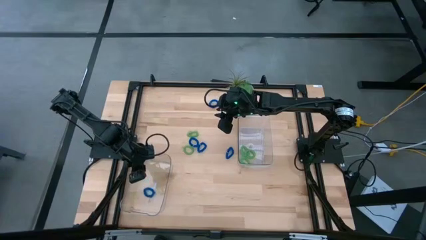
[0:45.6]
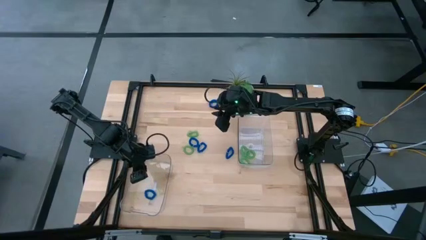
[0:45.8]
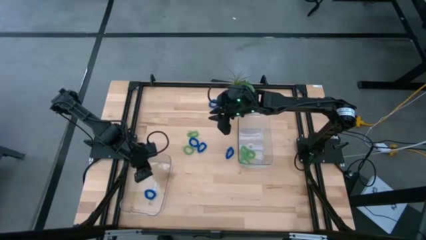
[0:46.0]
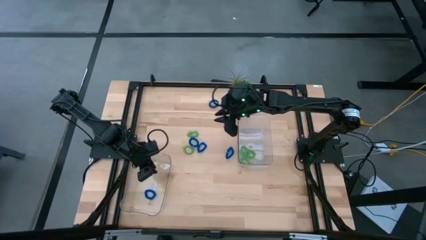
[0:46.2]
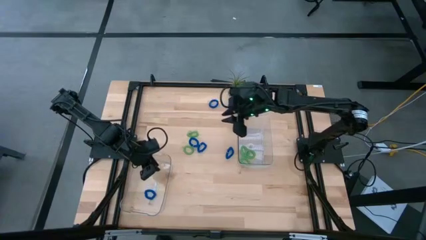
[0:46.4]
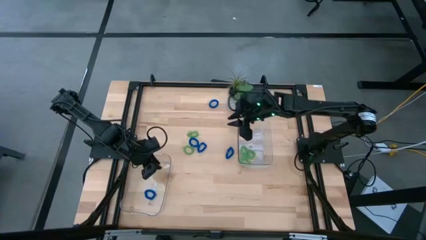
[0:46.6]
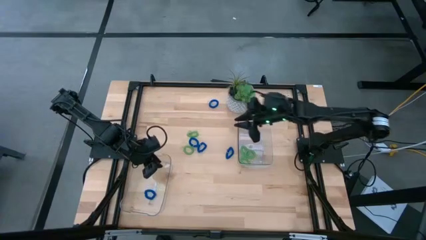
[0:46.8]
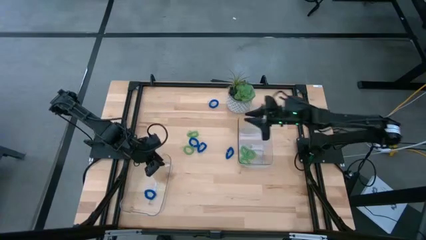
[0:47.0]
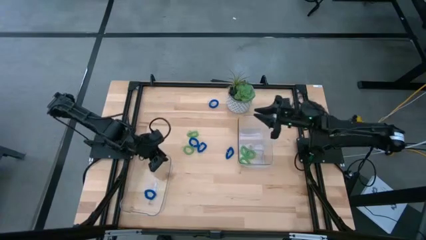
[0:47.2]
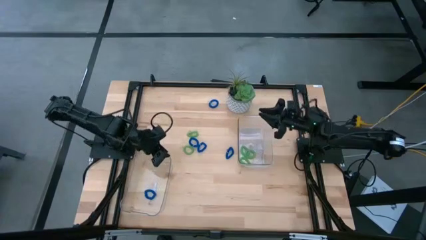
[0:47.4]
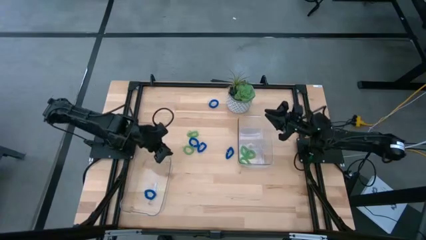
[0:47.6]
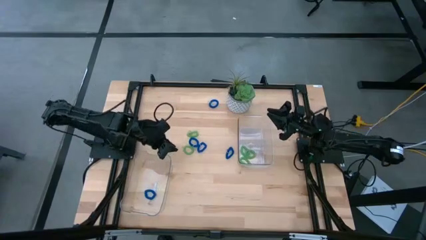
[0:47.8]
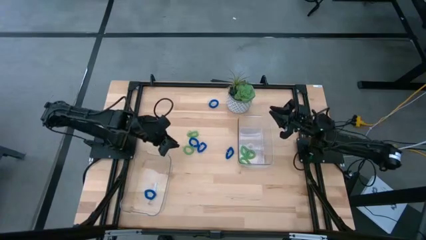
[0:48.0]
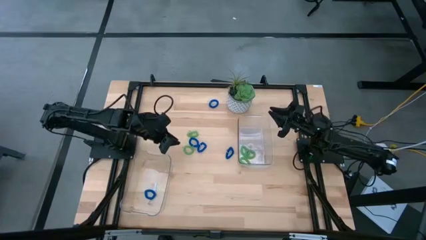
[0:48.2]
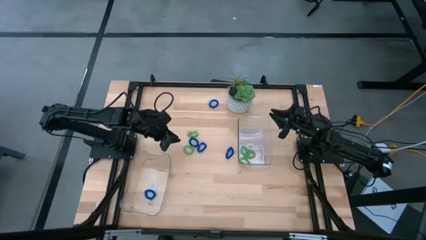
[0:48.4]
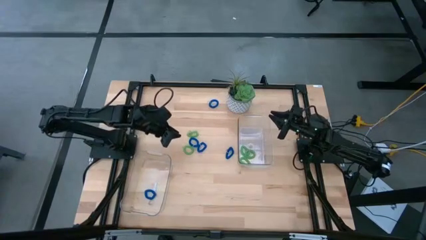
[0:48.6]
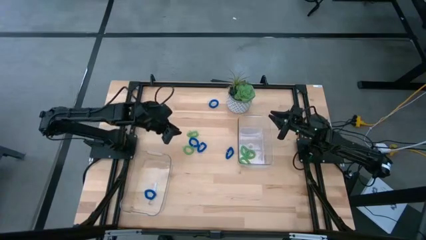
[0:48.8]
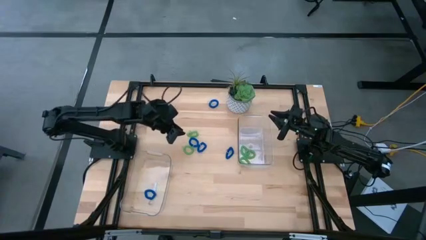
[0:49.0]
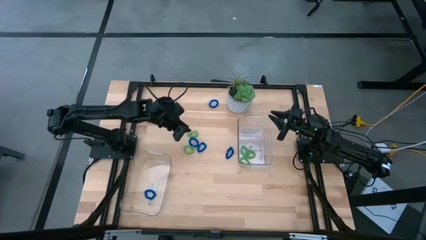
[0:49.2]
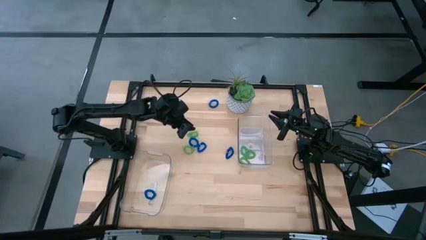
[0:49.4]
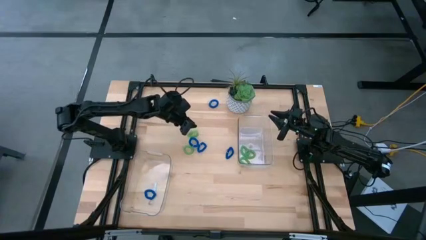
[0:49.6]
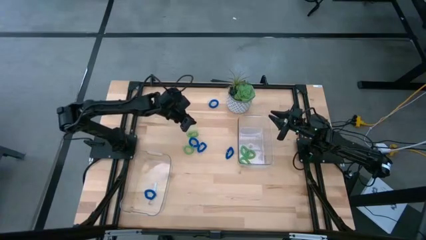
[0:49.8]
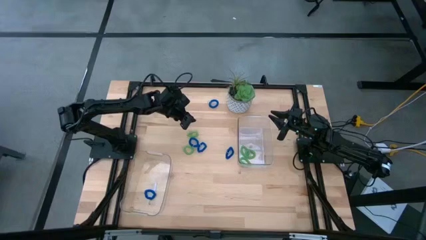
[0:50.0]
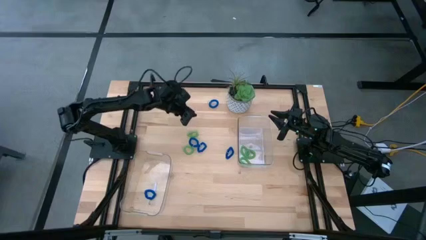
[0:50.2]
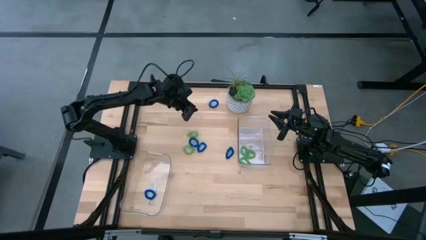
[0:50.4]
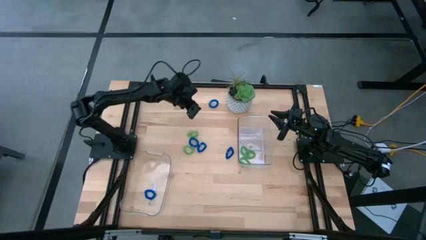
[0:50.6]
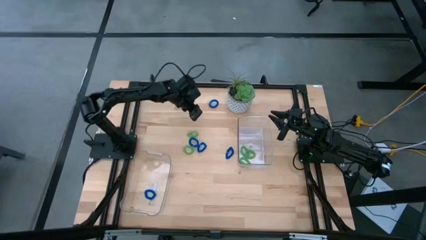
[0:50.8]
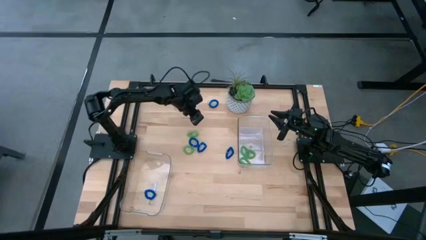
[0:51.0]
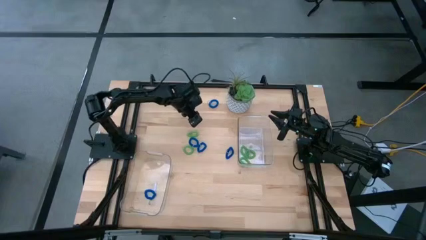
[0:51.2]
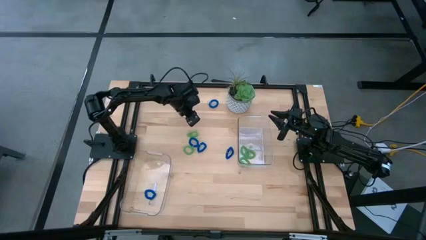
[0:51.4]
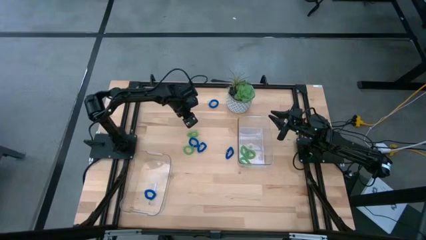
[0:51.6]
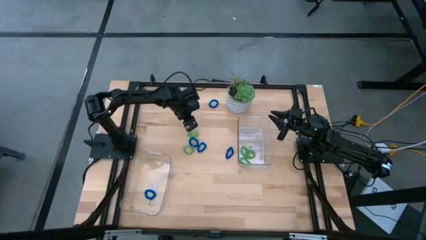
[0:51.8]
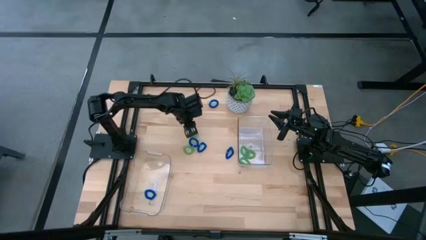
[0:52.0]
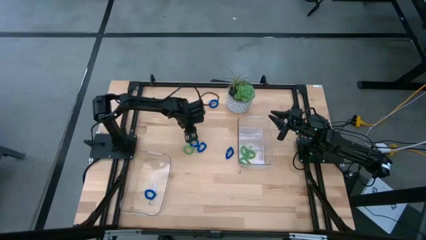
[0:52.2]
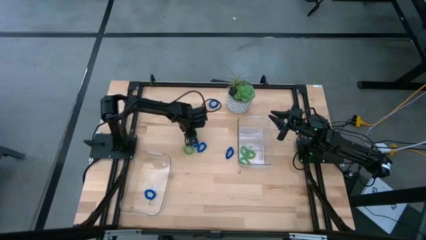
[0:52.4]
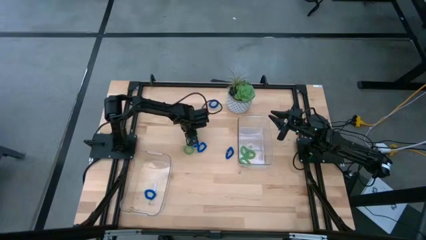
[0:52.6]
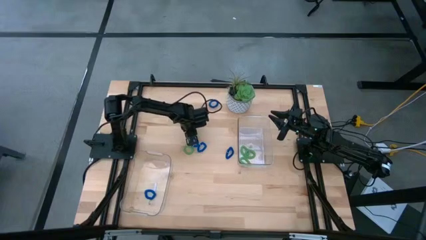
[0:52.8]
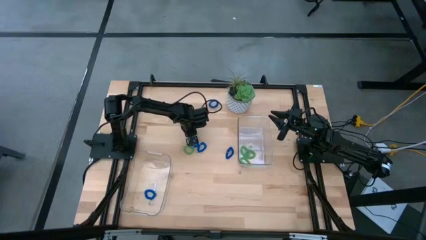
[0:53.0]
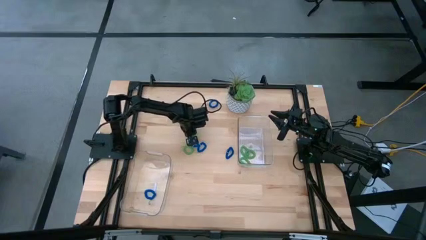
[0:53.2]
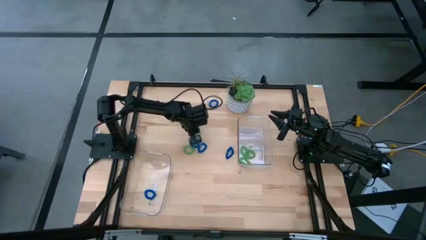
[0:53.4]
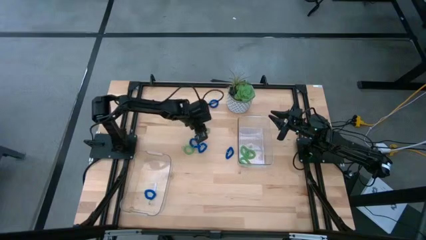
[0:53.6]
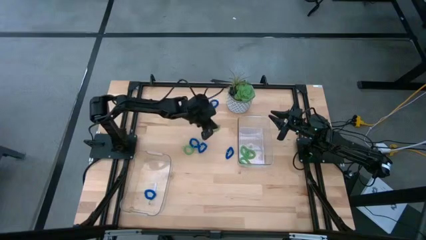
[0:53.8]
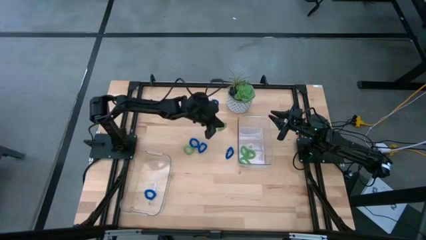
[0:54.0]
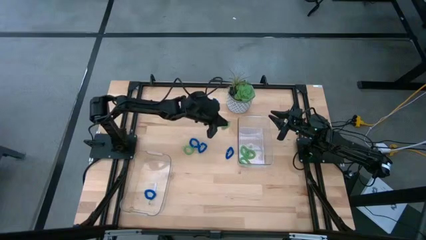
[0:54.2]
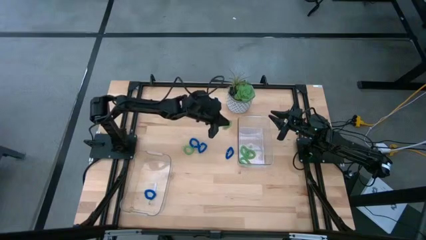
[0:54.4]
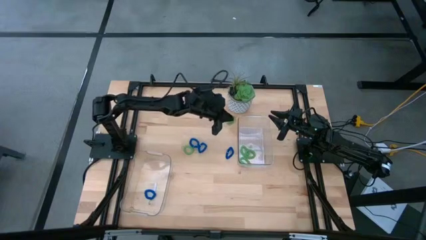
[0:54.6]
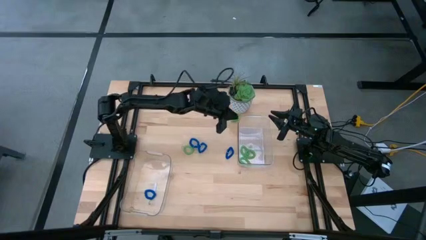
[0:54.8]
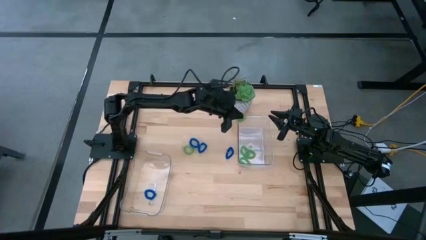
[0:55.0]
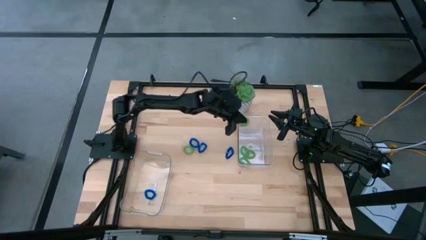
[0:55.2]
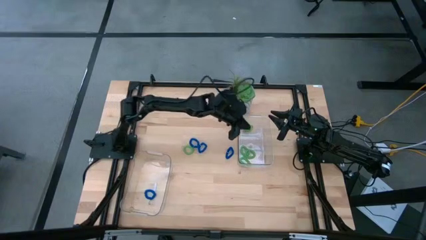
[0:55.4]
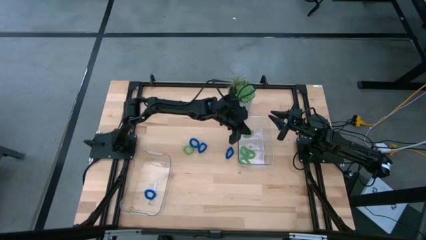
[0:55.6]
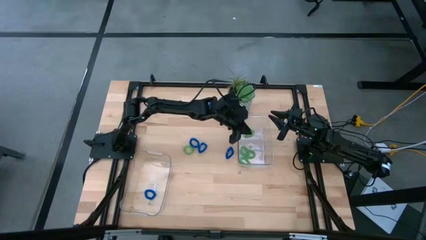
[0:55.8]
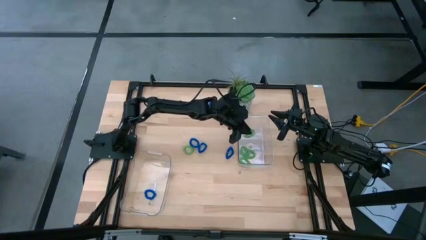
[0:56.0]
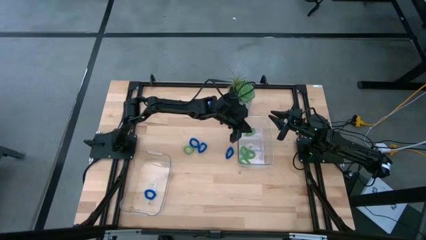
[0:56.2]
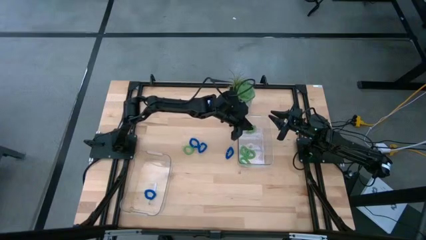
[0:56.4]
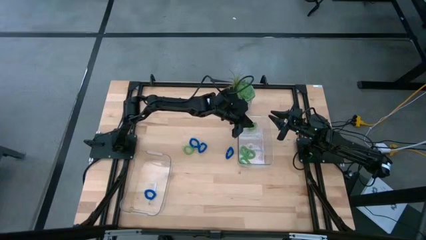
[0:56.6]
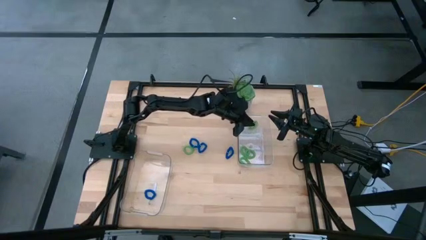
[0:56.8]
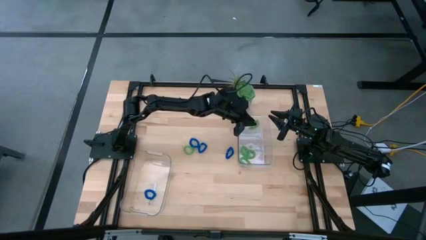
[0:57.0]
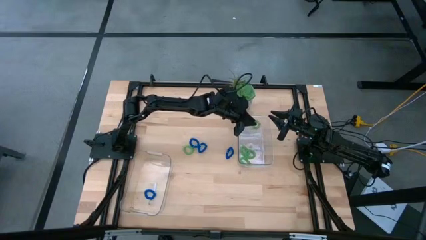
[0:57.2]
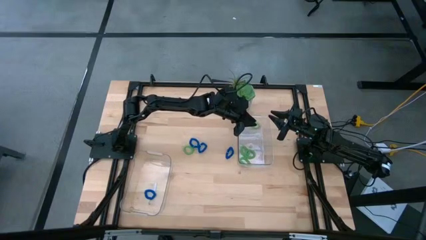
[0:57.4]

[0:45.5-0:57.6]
Task: Sort spring keychains
Put the green spring keychain into the top transparent bin

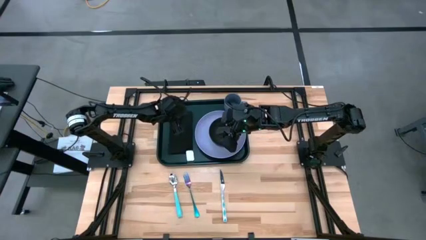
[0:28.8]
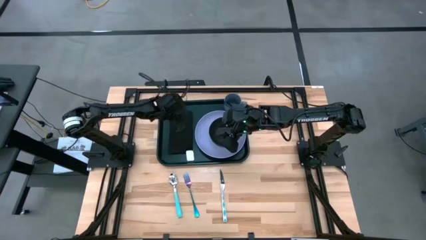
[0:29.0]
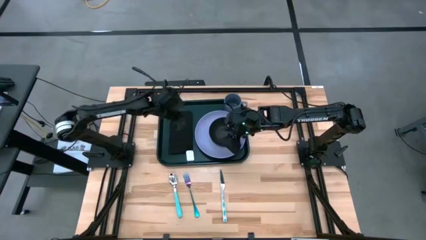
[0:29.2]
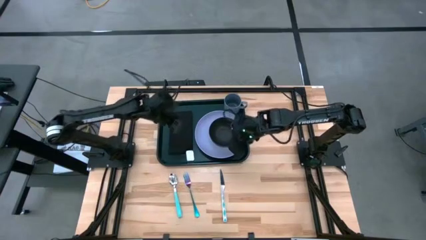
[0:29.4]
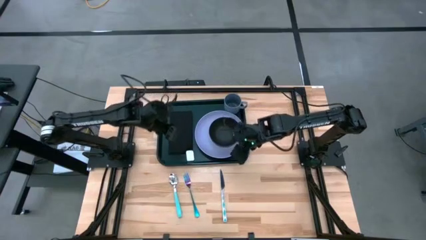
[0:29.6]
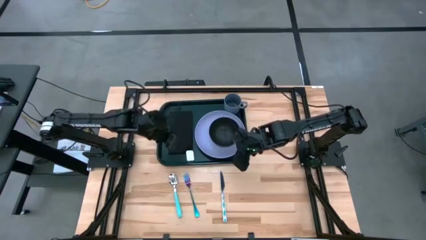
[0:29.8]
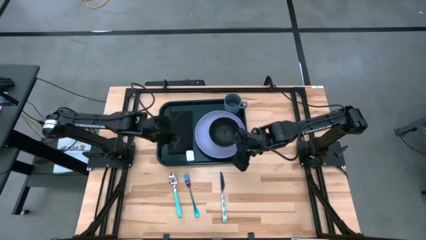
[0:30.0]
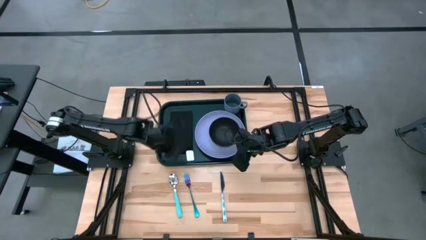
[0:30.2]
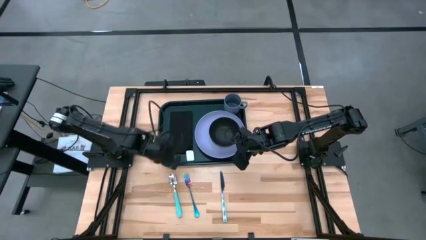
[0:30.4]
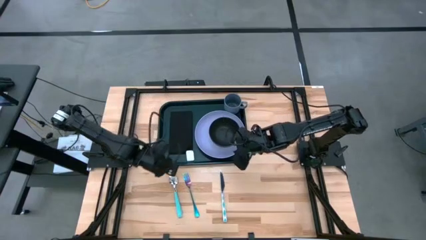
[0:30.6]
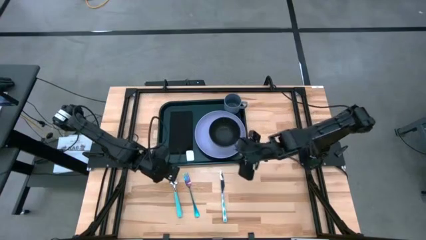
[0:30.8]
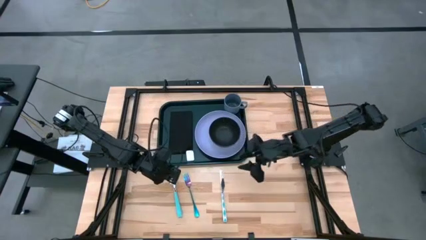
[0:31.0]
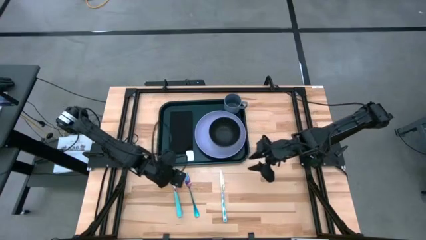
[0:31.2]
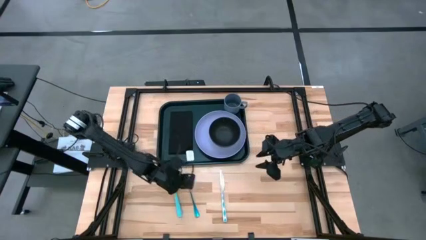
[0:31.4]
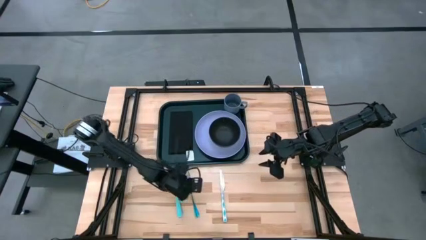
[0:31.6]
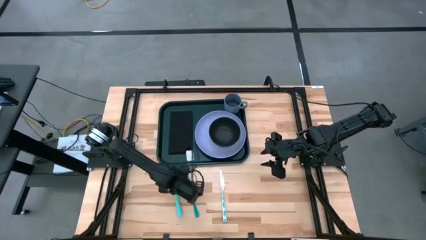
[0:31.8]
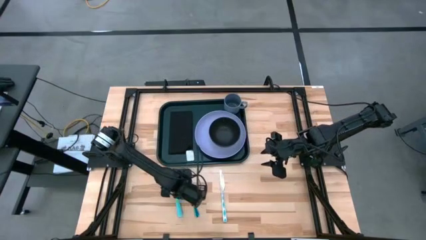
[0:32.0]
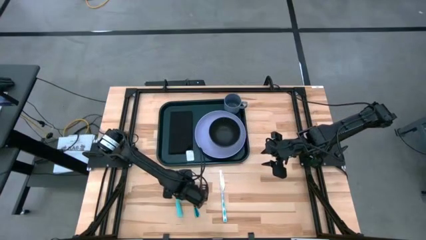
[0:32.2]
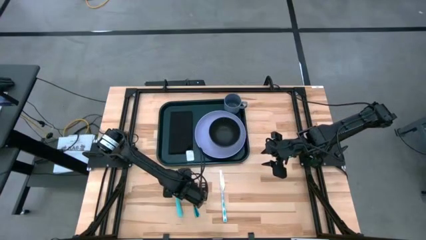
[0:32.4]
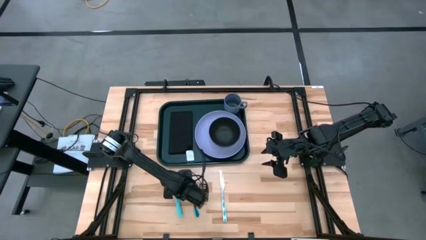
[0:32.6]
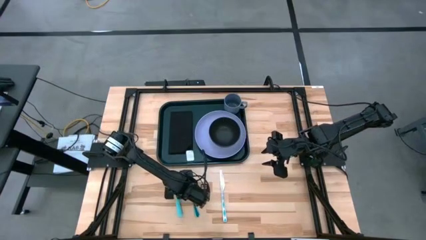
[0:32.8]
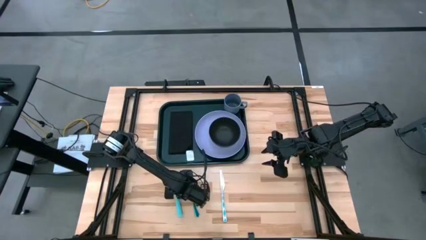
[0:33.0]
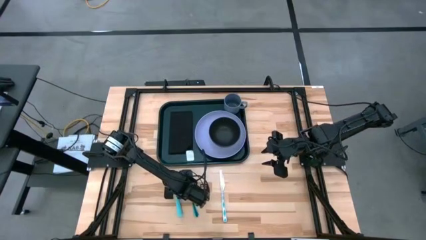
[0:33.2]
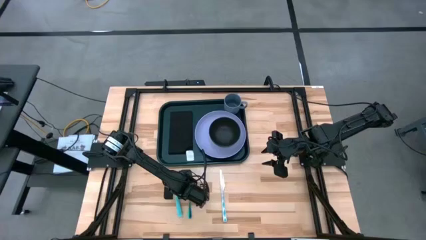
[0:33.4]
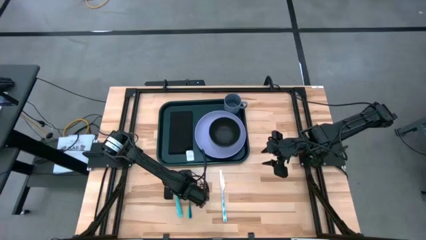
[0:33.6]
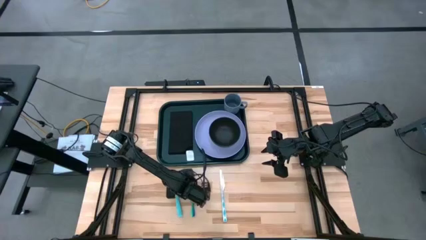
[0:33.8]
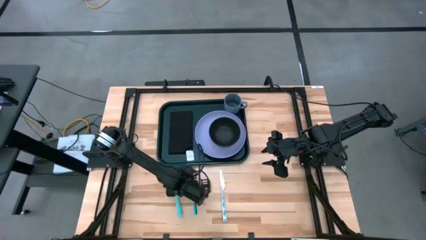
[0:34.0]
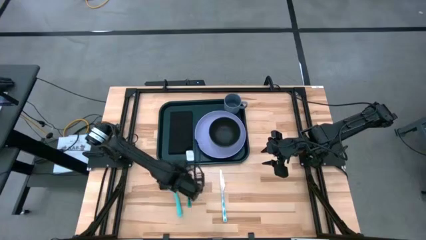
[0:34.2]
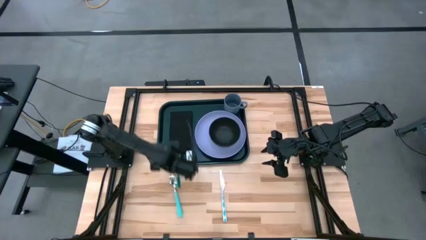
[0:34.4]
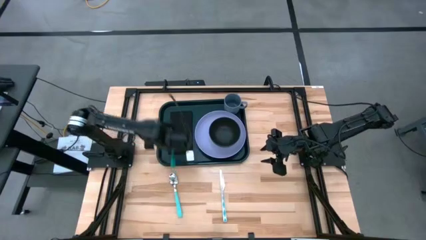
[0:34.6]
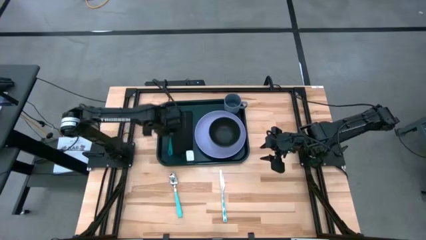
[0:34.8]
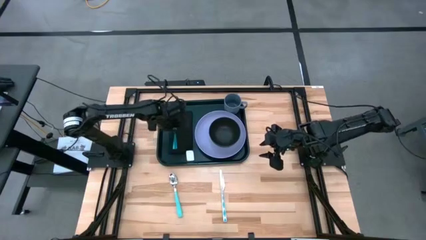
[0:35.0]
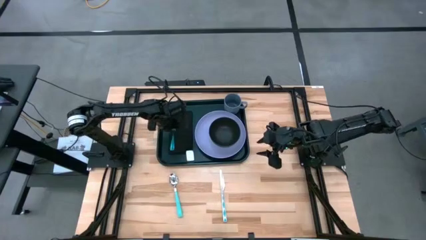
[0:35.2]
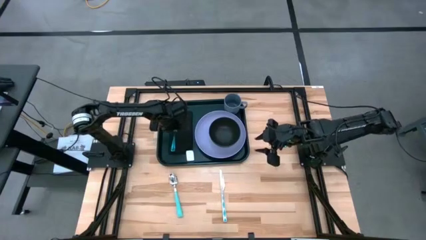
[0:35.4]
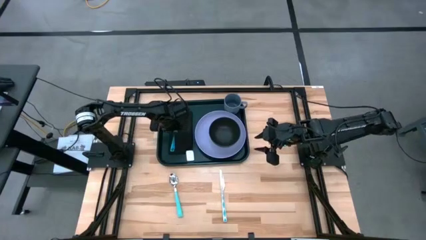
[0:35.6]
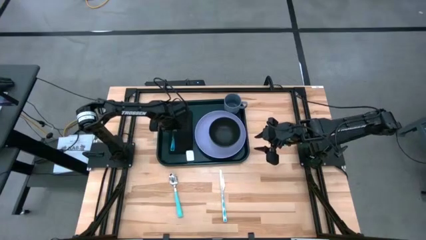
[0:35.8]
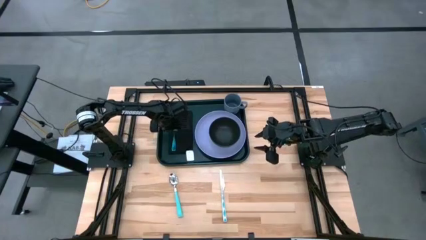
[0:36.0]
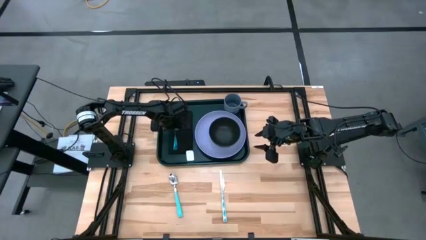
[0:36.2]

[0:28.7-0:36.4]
Task: Set up tray
Put the blue fork on the black napkin
